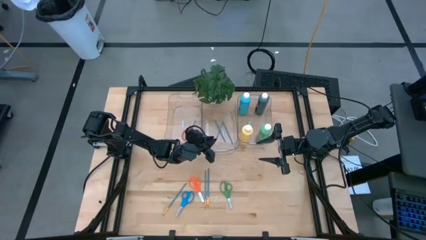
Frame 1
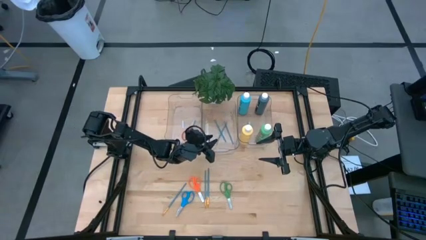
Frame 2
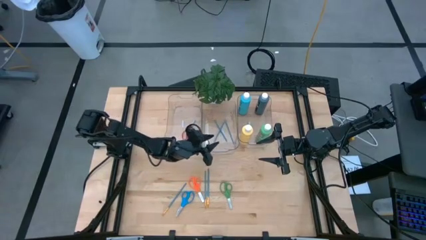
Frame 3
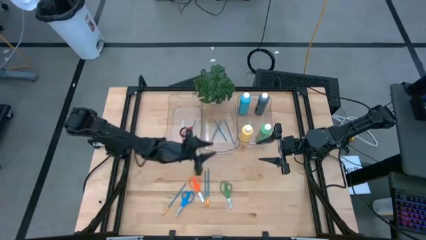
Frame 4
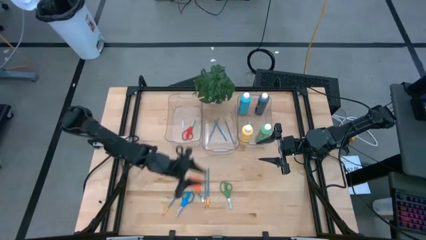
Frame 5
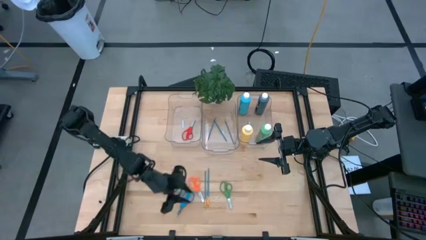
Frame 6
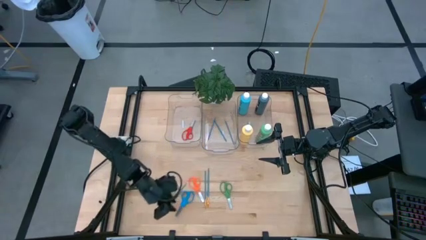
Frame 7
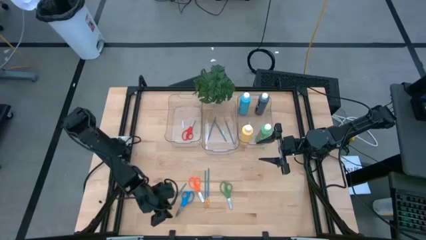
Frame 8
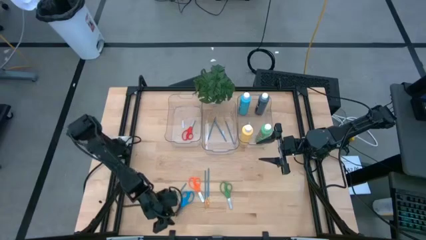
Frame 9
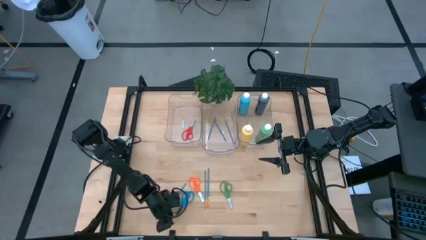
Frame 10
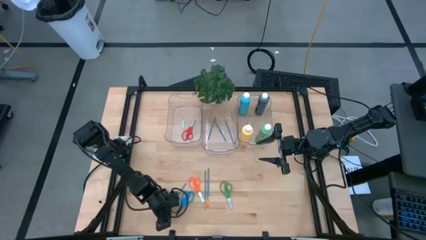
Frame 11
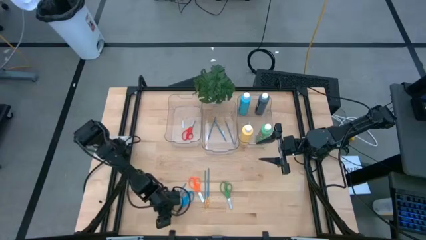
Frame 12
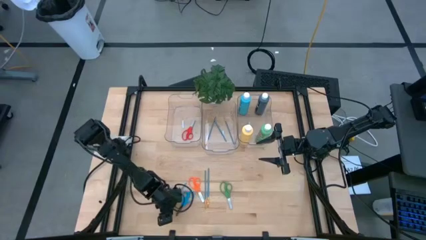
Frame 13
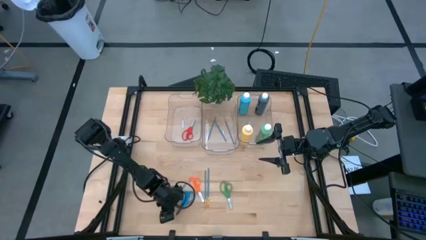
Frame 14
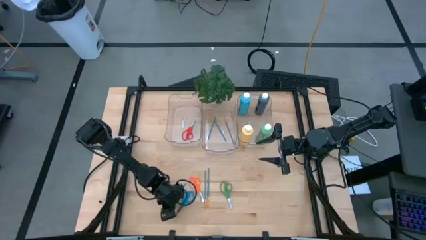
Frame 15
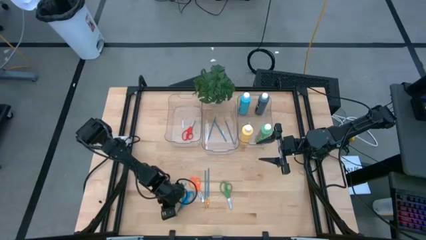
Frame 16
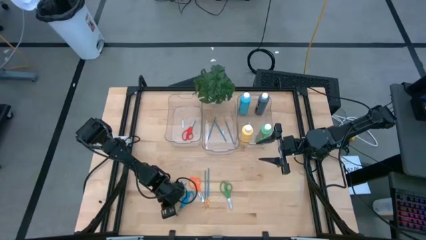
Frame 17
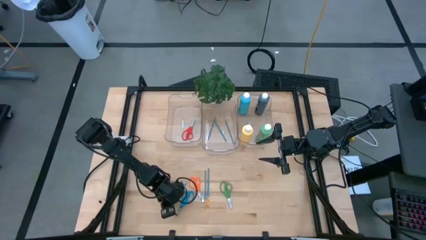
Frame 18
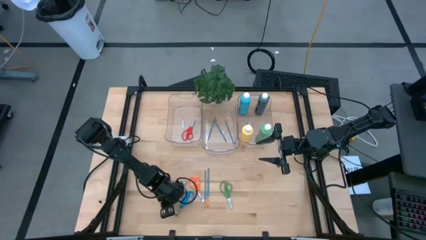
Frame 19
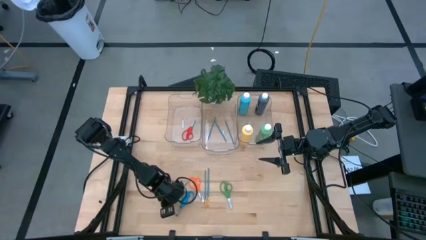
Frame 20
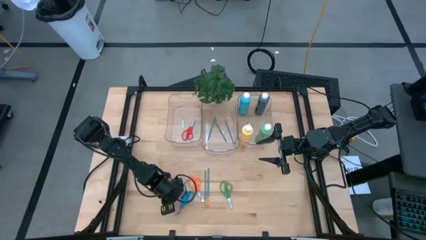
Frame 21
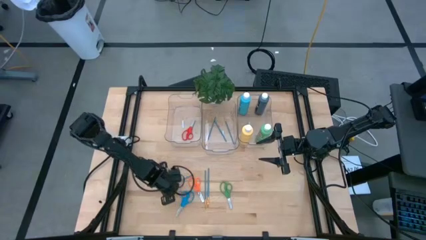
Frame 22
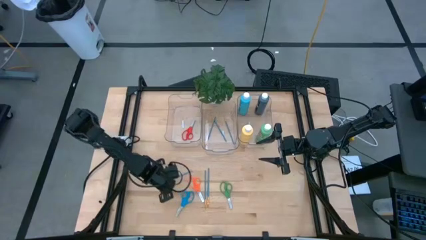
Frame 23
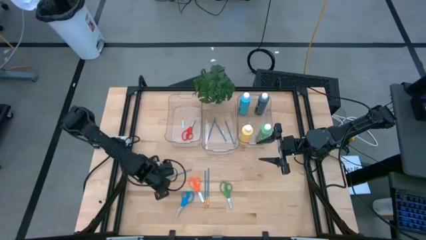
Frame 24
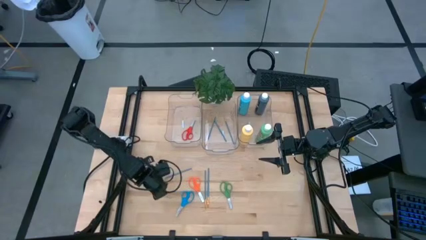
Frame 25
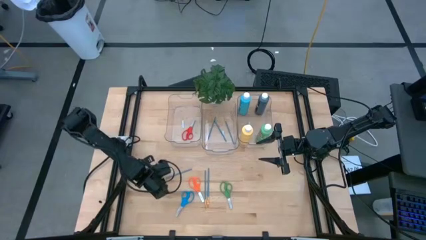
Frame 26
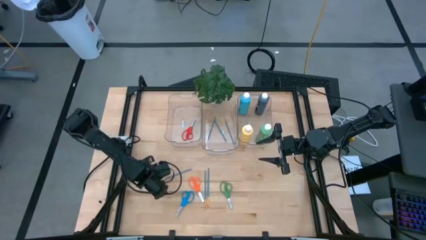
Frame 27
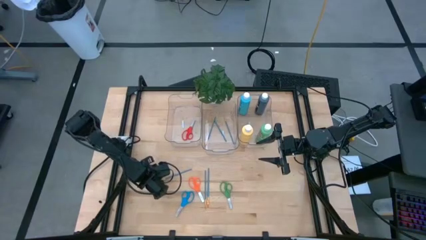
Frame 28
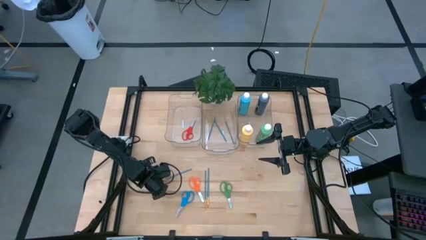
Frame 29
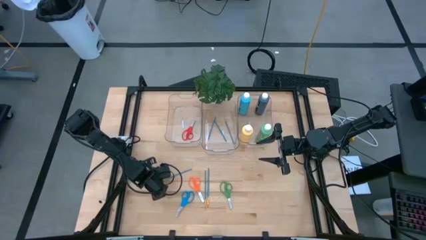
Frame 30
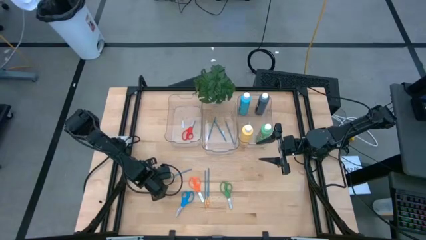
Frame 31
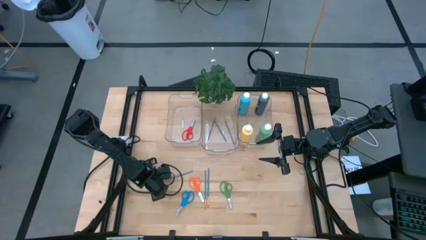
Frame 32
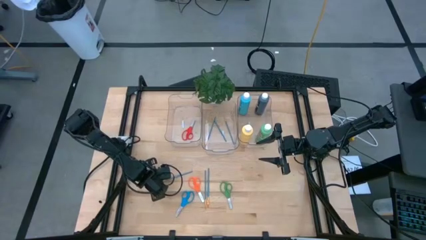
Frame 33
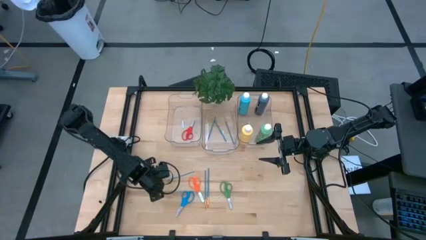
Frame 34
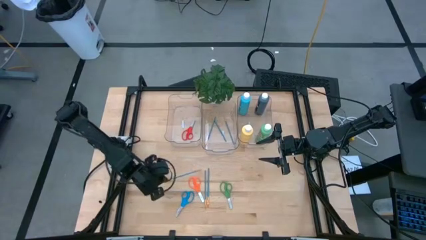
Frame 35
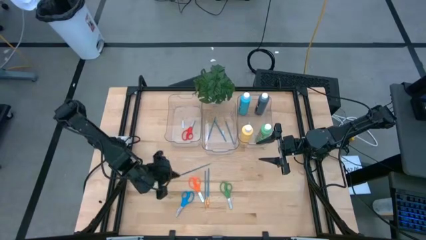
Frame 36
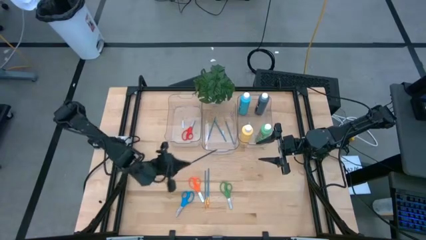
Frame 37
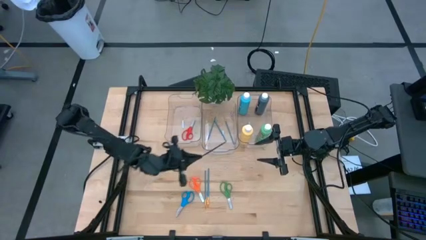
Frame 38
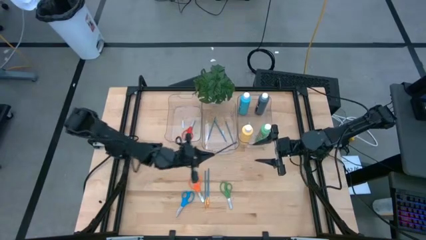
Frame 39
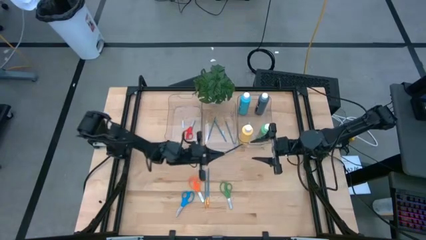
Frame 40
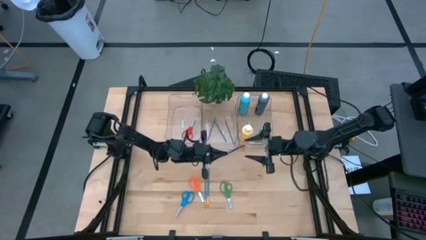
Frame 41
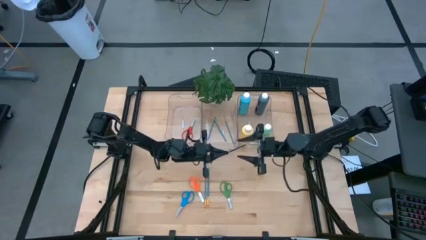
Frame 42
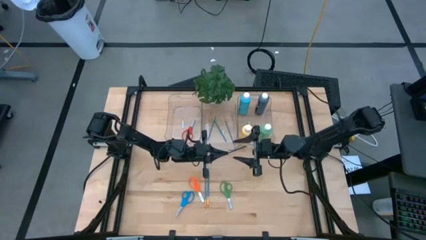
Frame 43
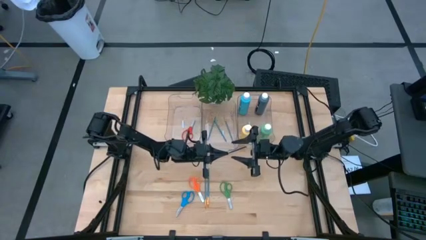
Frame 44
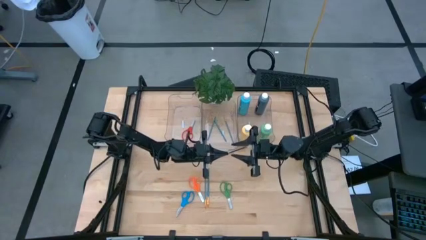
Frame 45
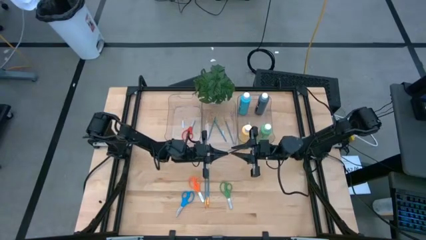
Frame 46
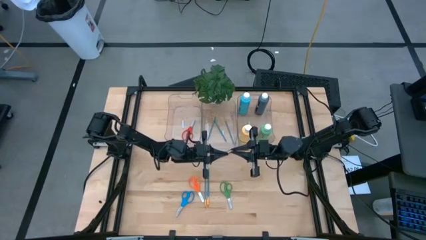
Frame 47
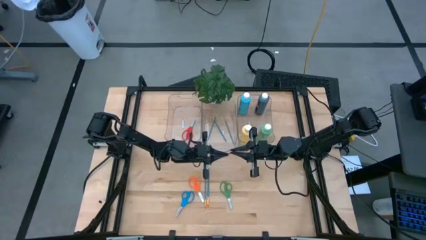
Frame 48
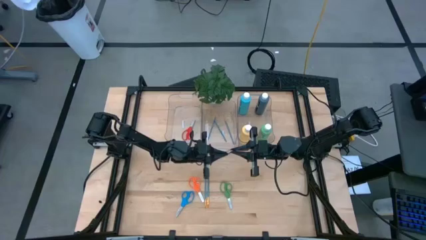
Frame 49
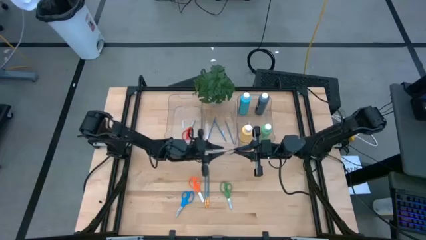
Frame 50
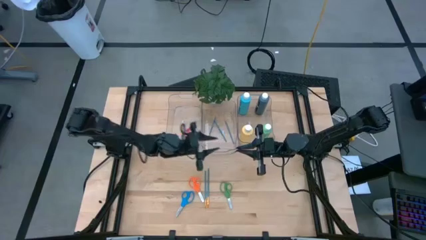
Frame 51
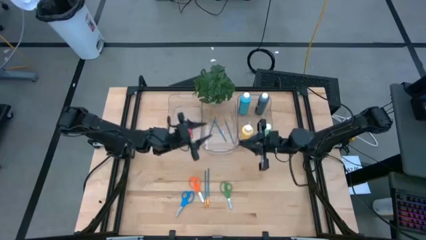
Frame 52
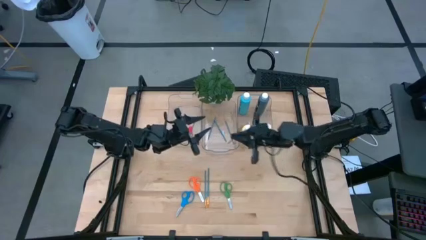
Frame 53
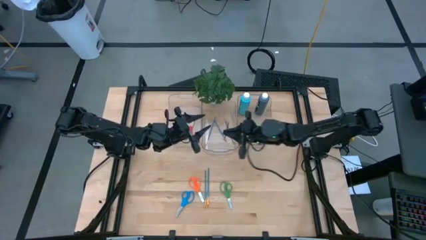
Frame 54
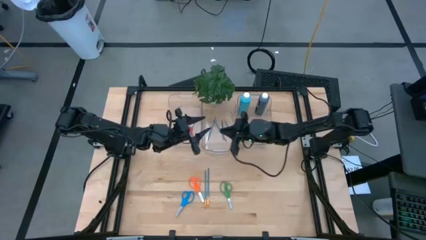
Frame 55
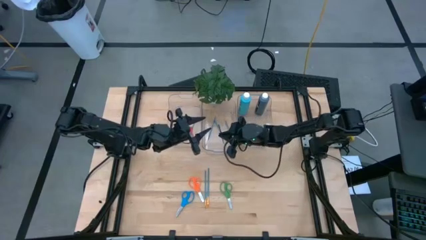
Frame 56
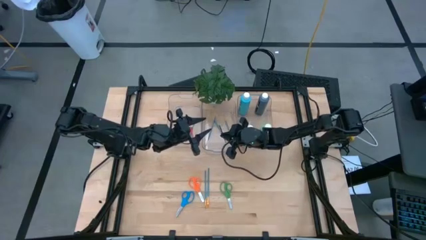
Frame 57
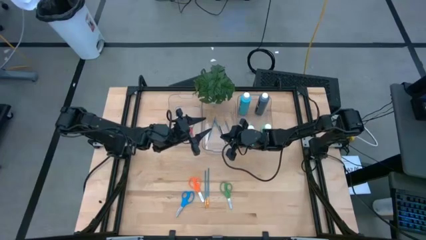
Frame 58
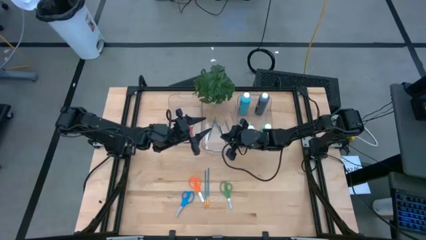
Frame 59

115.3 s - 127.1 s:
Task: Pick & Place Paint Supplies
Put the blue paintbrush into the middle transparent bin

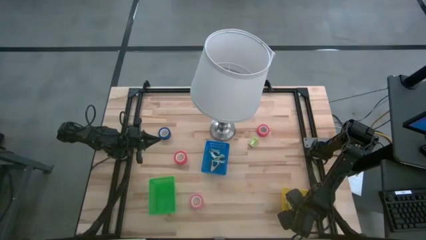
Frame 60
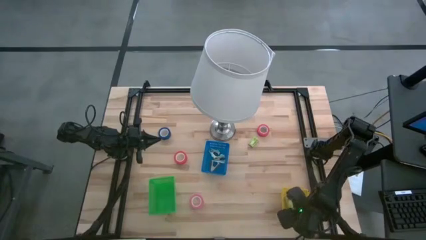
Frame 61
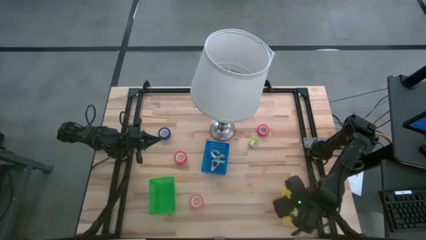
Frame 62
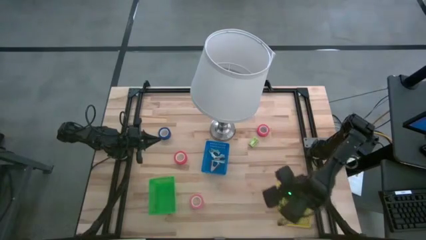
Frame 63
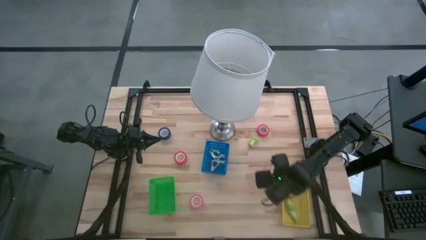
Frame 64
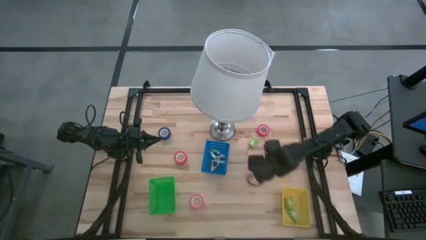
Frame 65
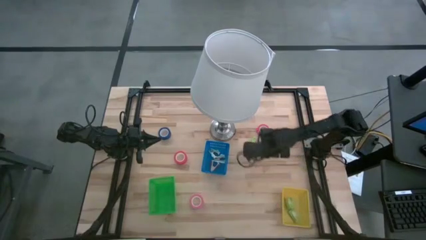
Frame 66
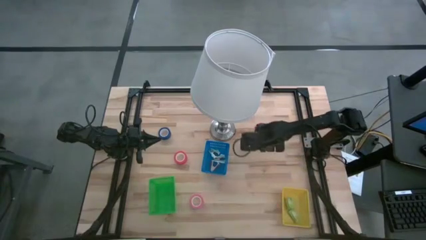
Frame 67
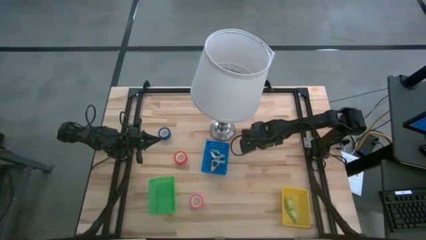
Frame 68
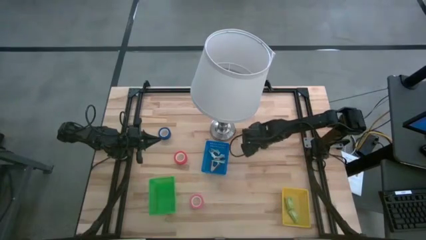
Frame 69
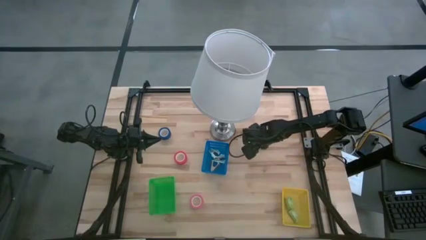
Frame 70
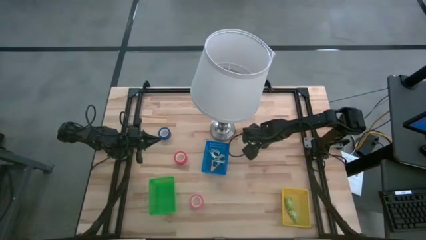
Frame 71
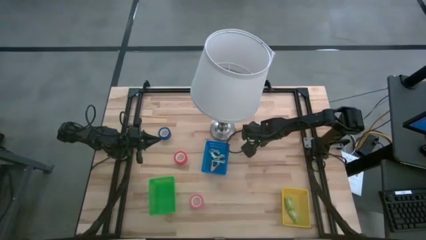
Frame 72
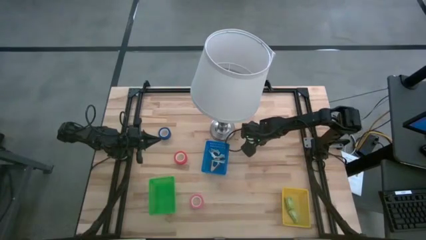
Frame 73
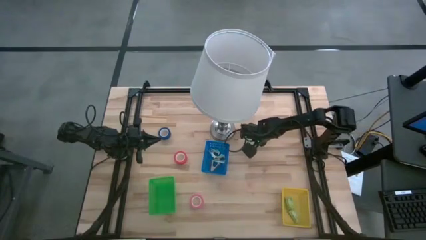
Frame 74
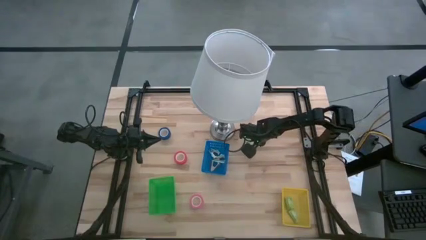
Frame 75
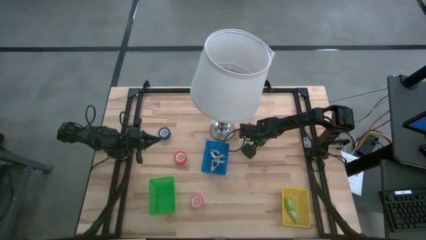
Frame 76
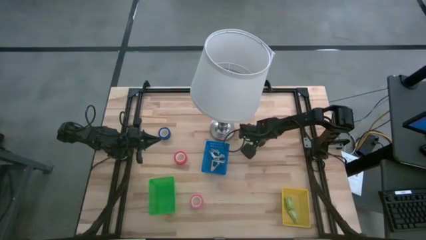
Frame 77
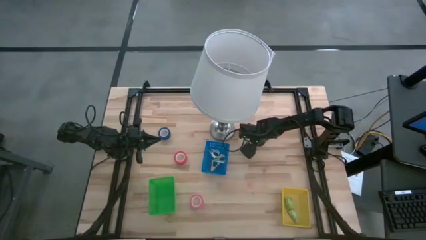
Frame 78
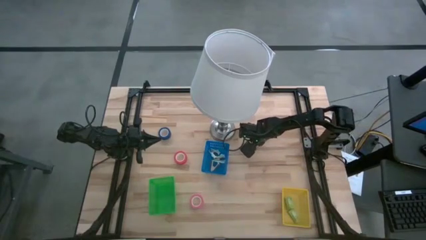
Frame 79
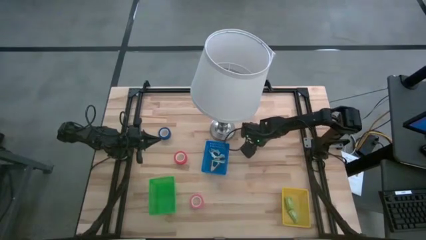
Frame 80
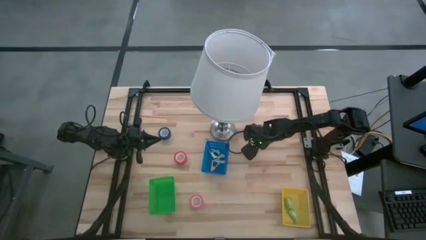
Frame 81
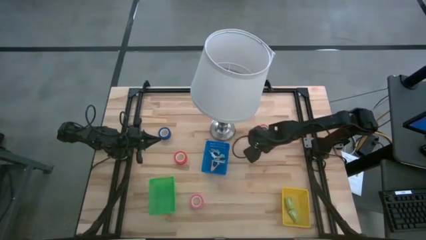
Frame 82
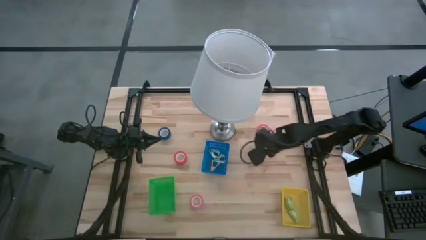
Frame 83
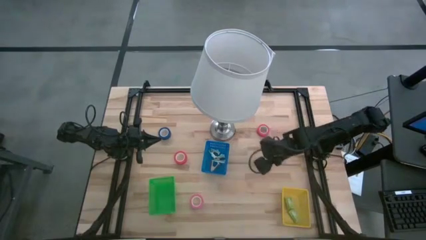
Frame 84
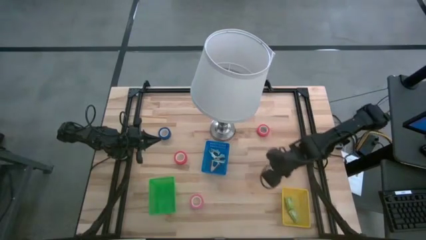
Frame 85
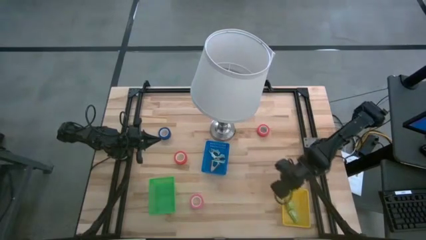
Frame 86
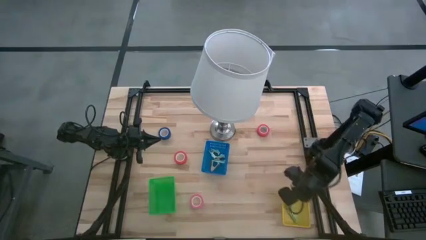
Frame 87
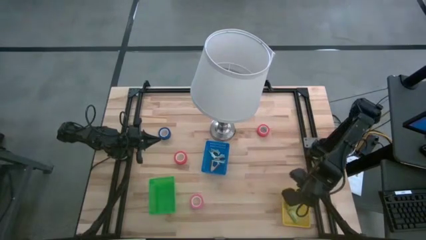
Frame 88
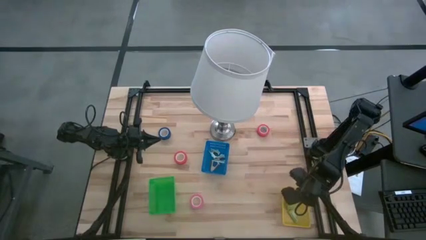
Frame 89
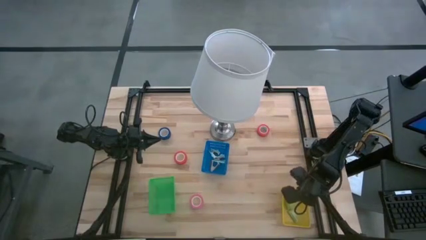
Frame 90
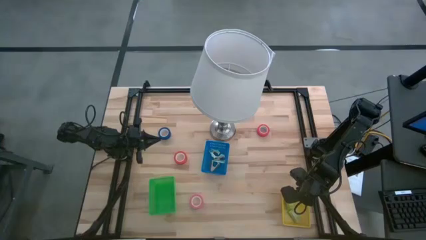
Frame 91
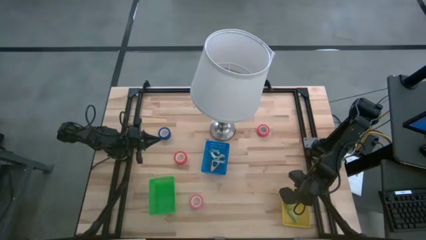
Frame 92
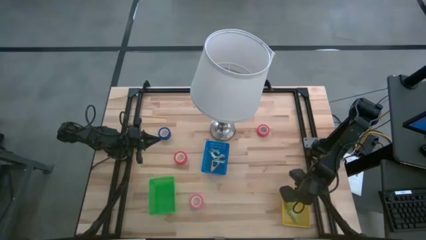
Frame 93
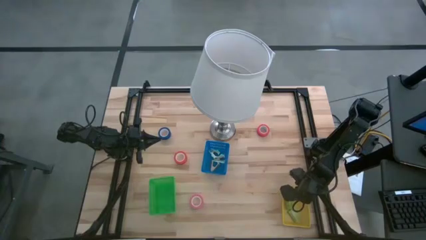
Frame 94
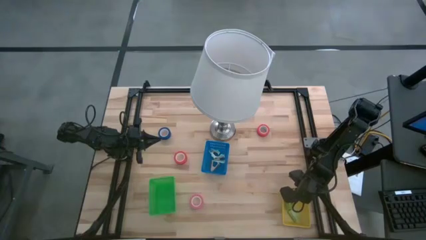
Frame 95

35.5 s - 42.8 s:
Task: Pick and place Stapler, Stapler remover, tape
Put the green staple box into the yellow bin
